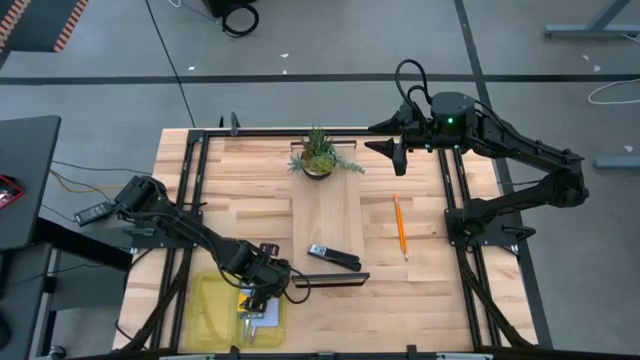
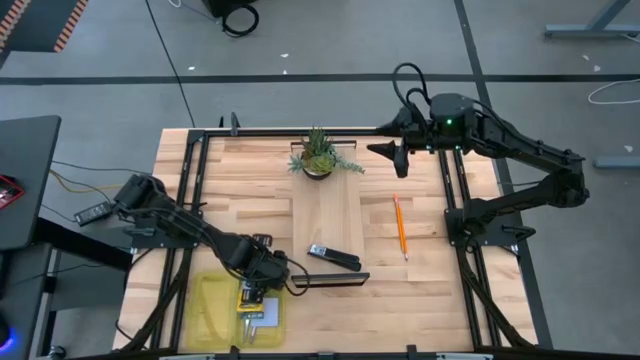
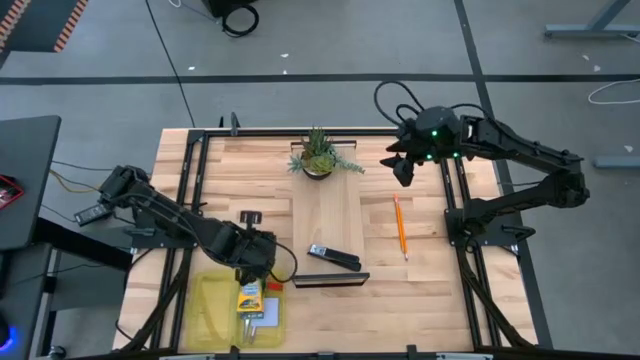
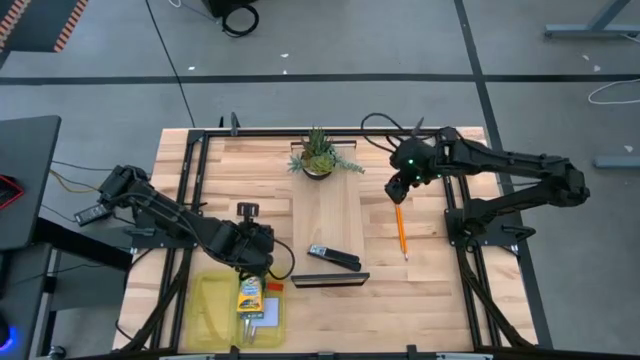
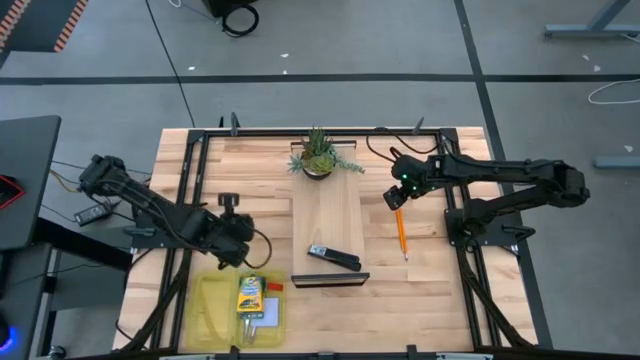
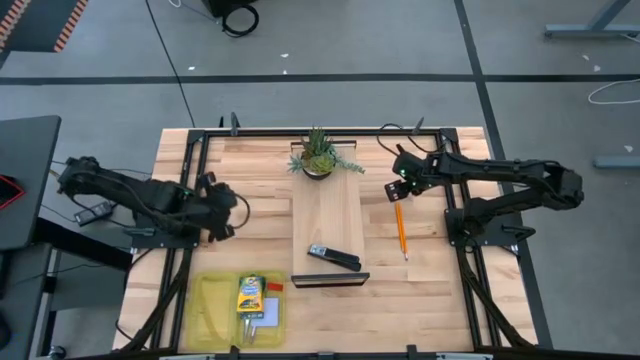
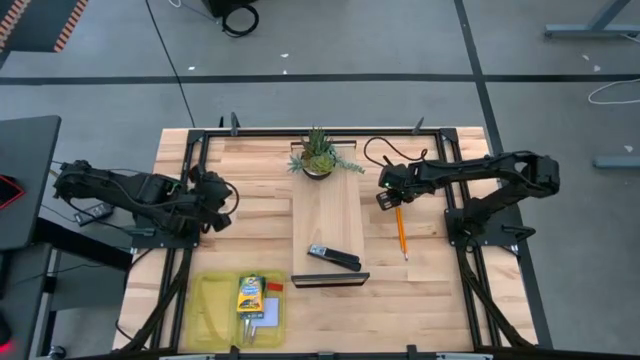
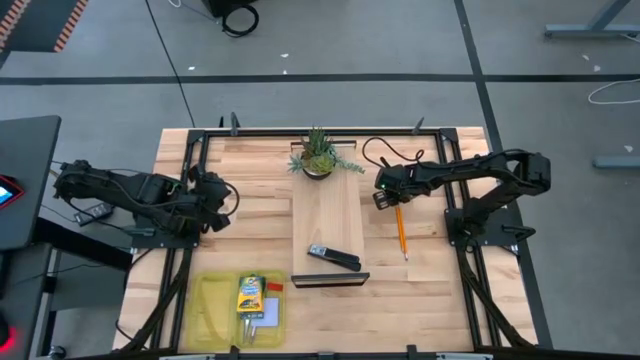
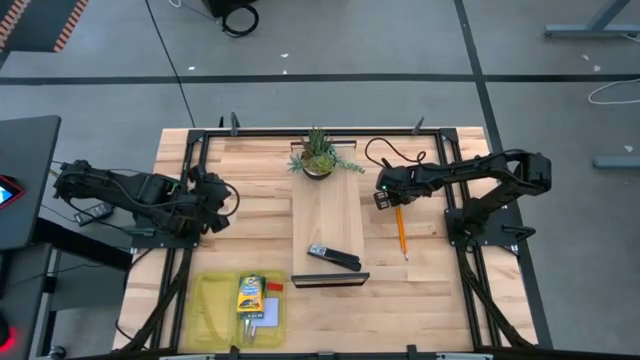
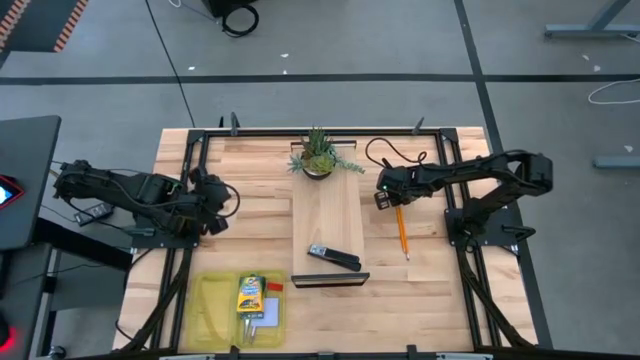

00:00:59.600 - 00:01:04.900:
Task: Pack school essentials
Put the pencil with the pencil top eraser into the supply box

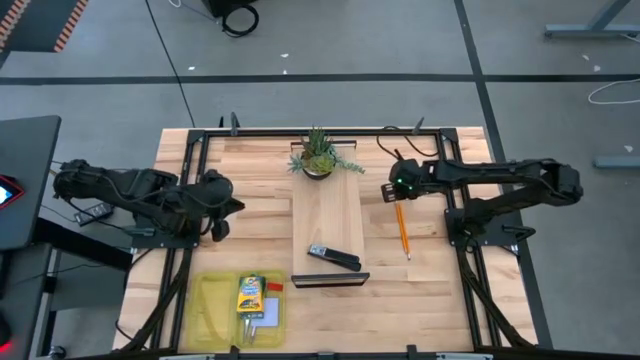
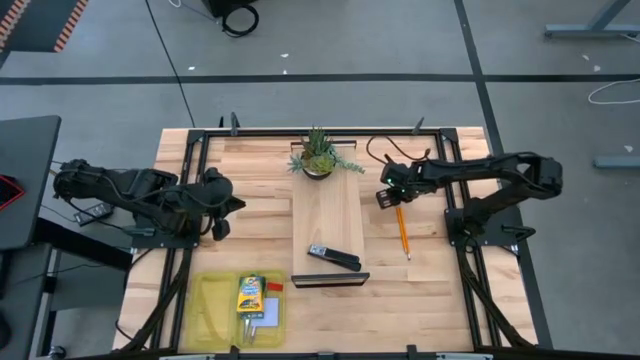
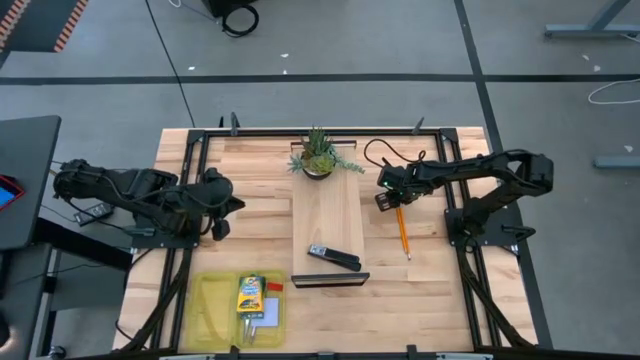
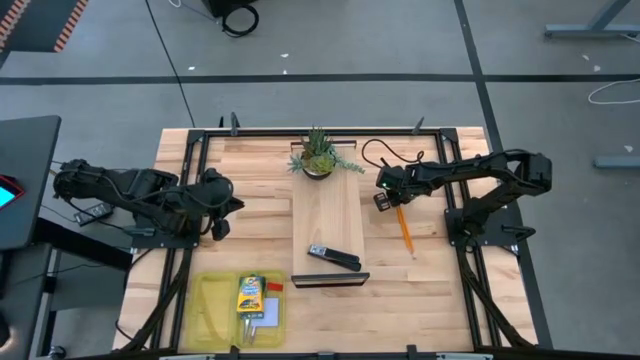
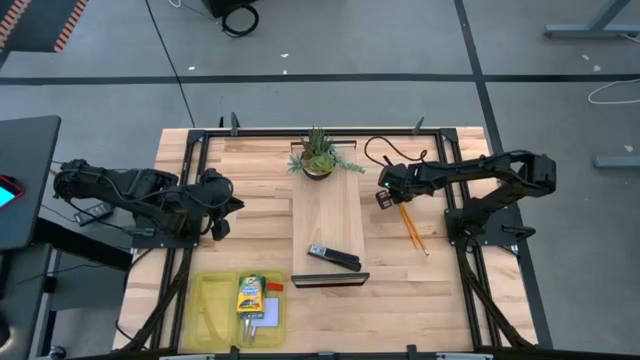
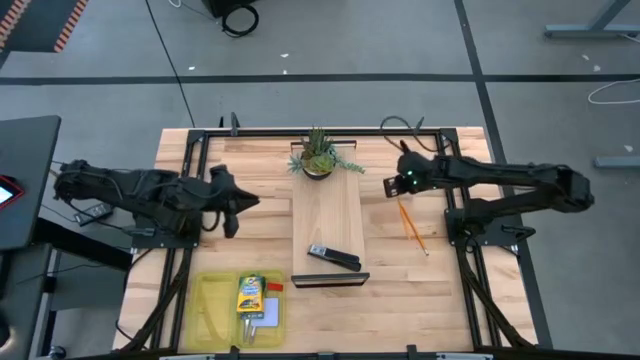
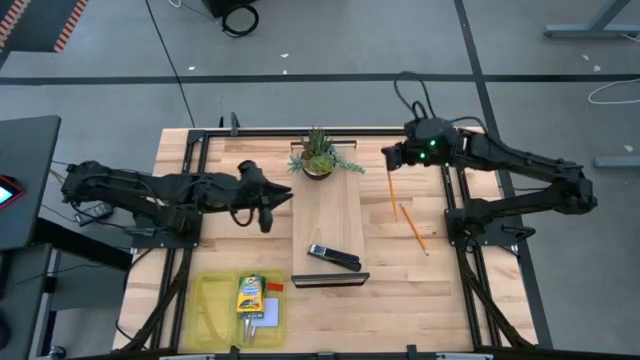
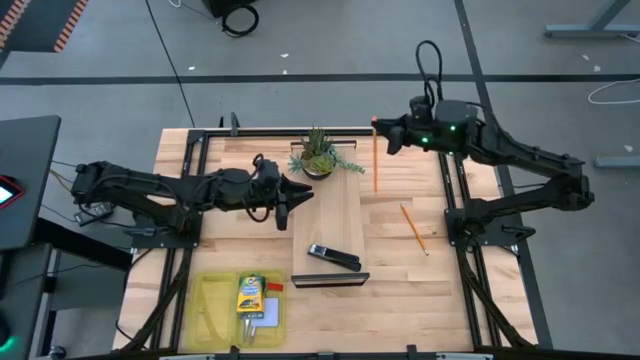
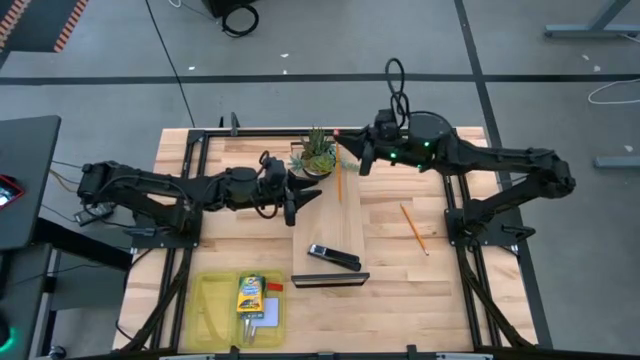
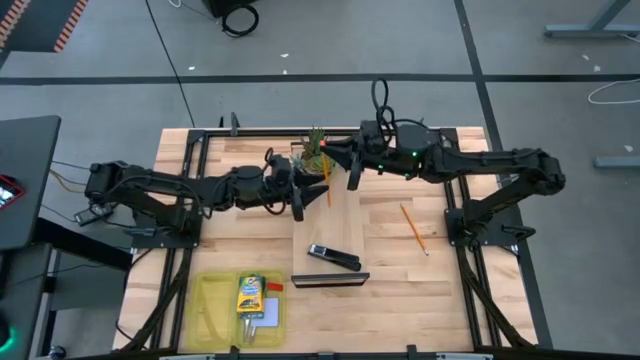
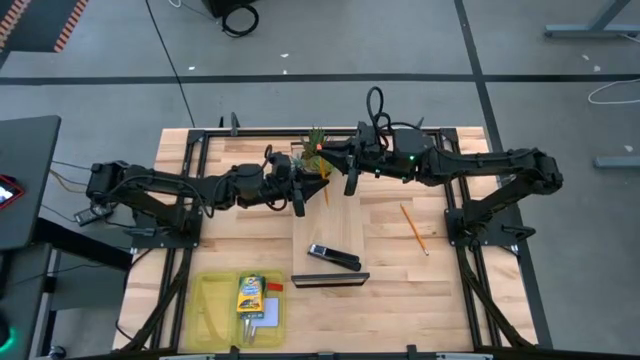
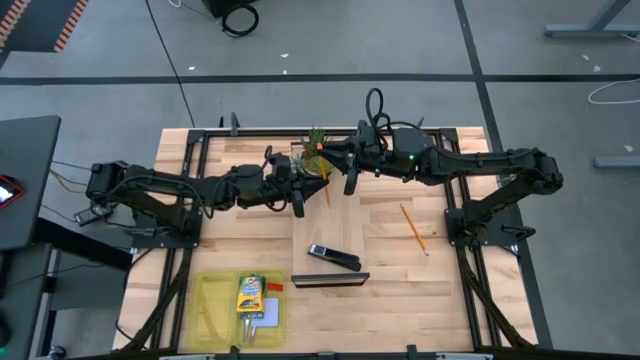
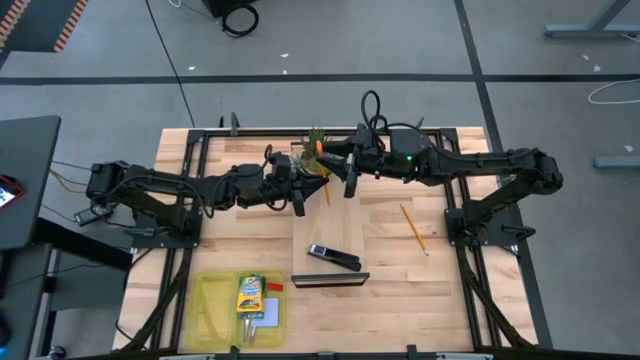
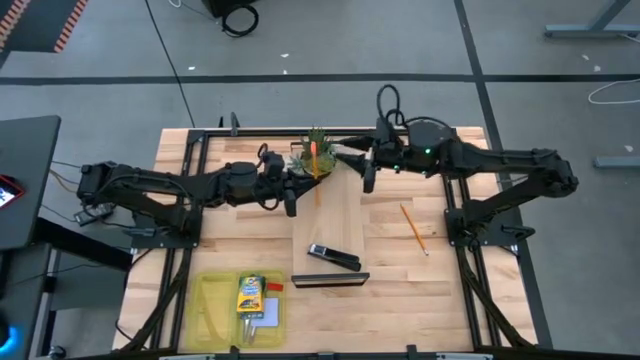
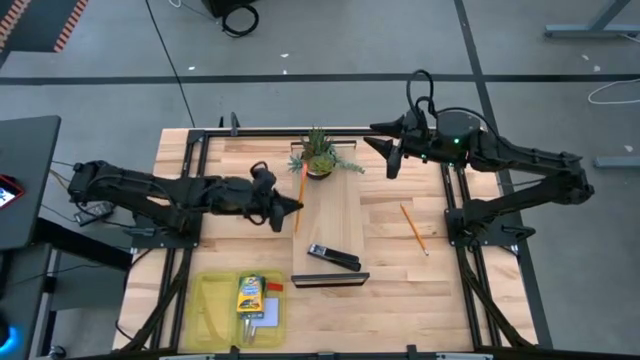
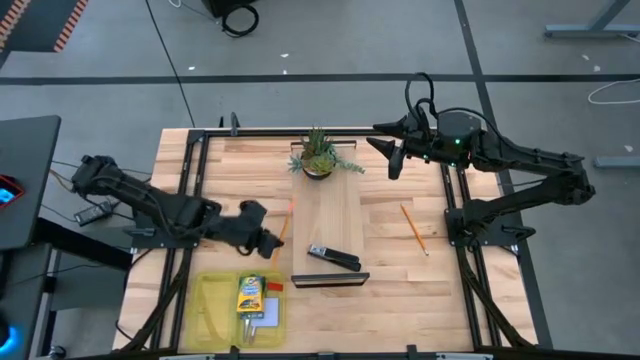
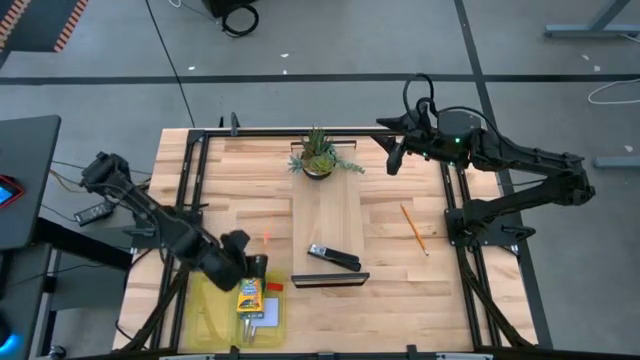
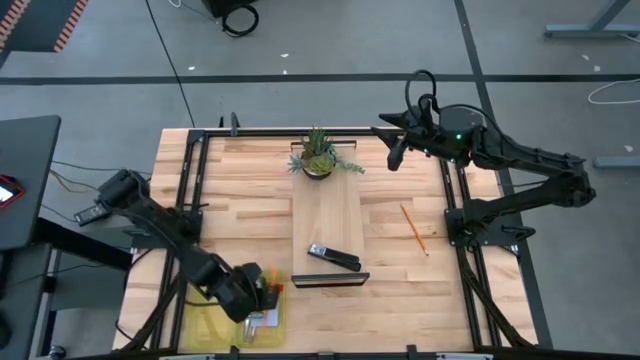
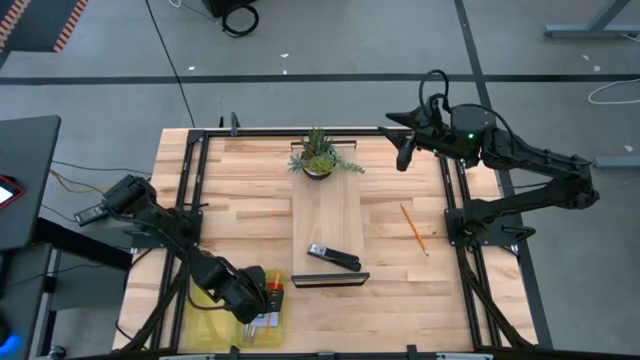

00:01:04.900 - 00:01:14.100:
Put the pencil with the pencil top eraser into the supply box

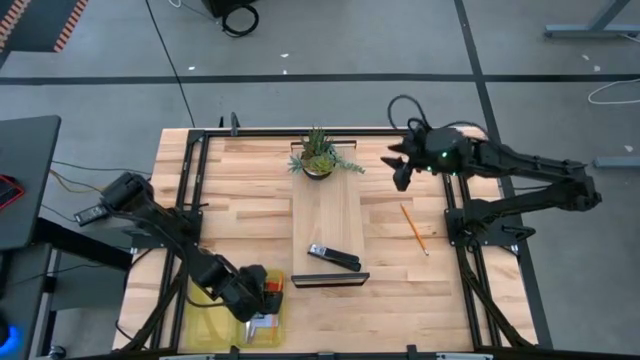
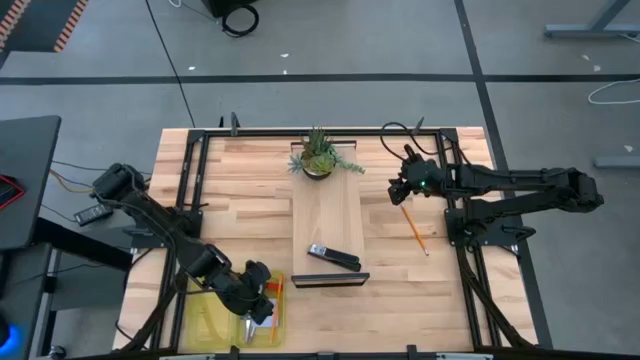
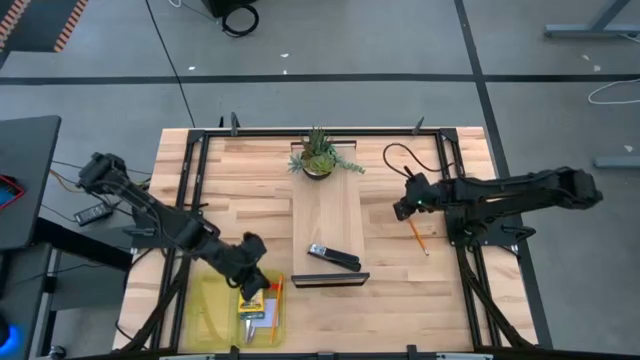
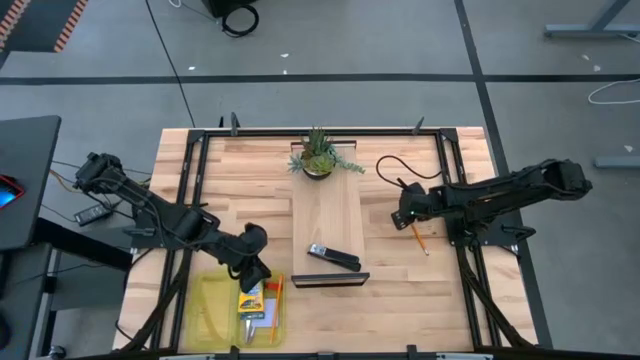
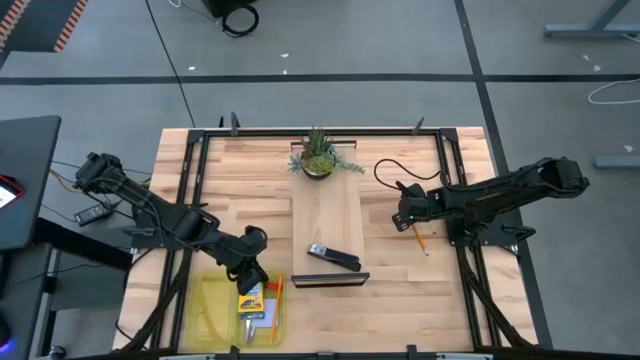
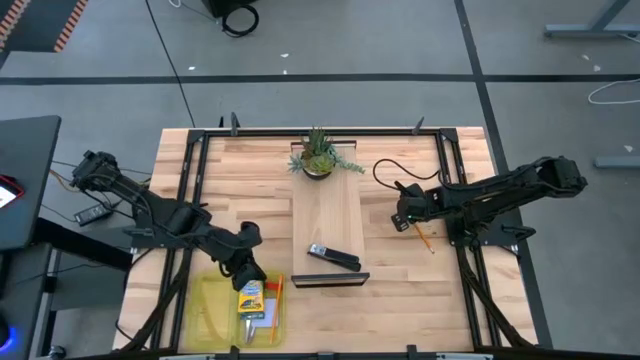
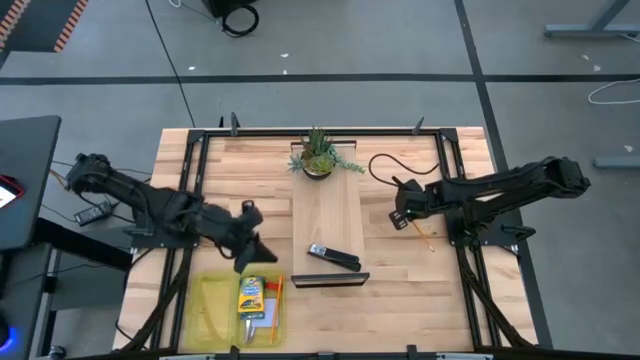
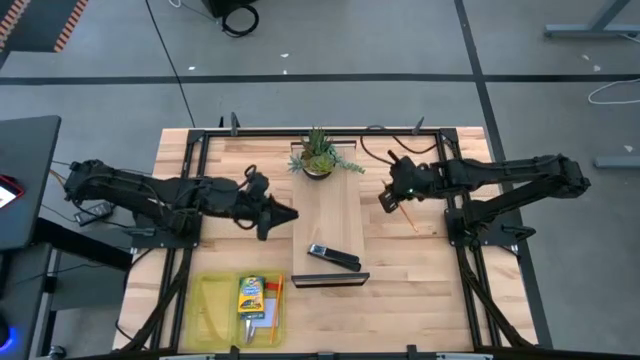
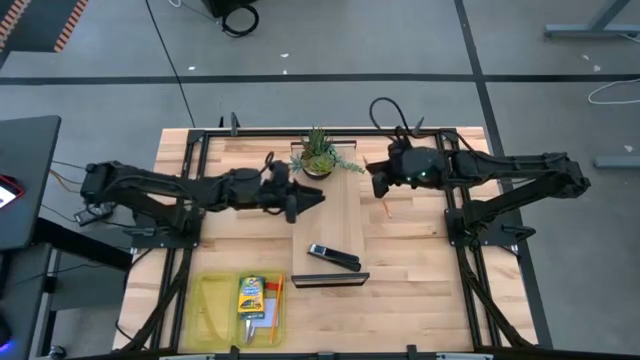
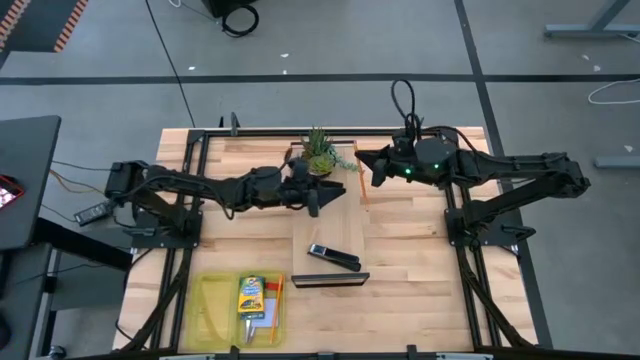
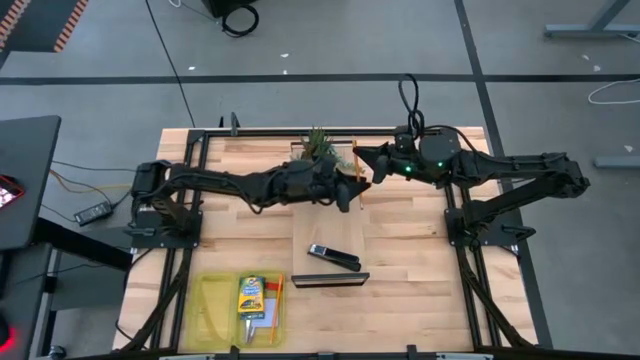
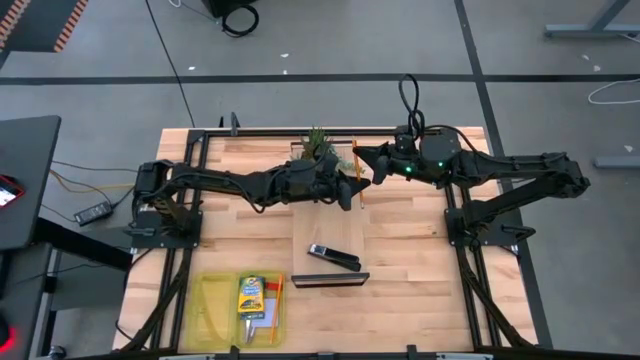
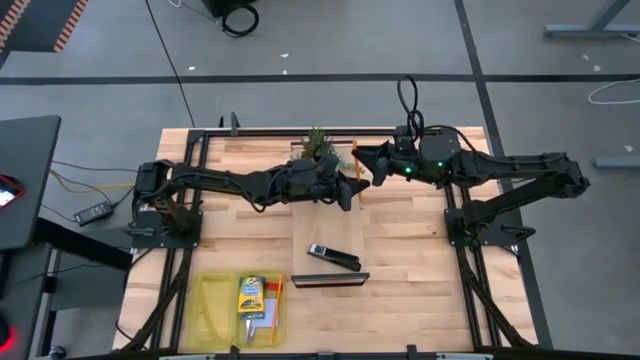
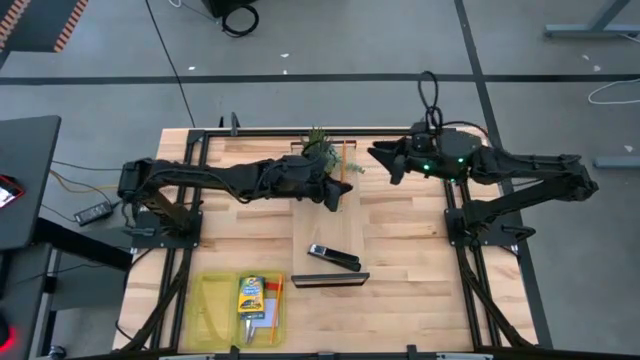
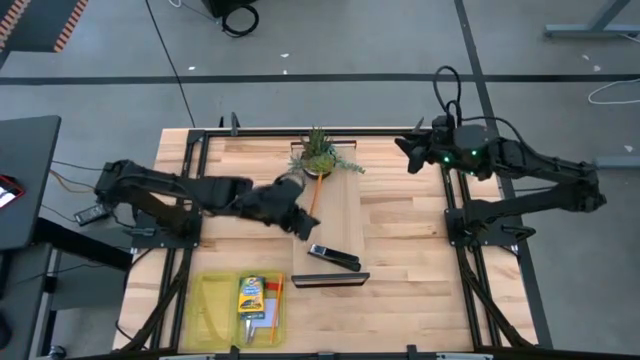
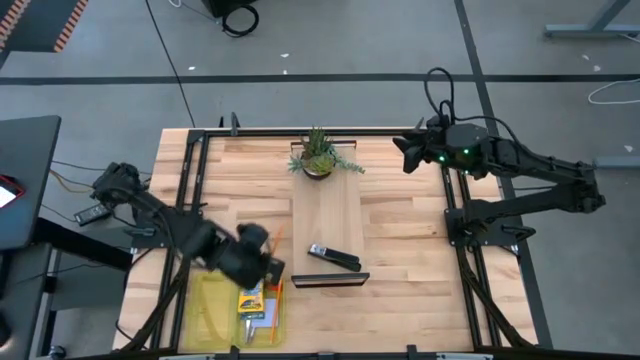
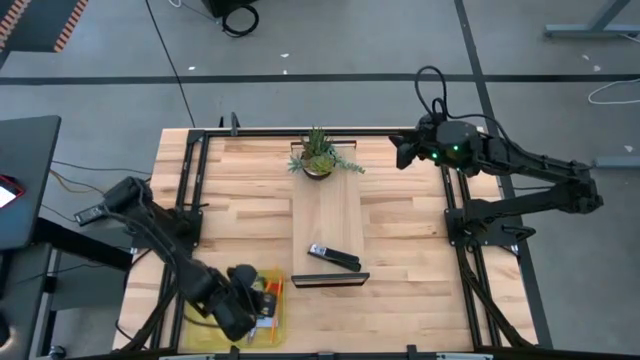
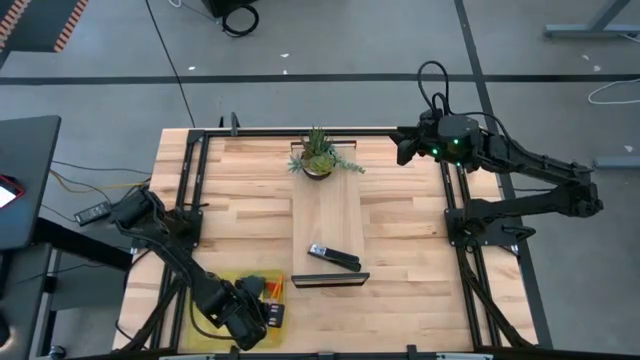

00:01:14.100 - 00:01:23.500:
Put the pencil into the supply box
